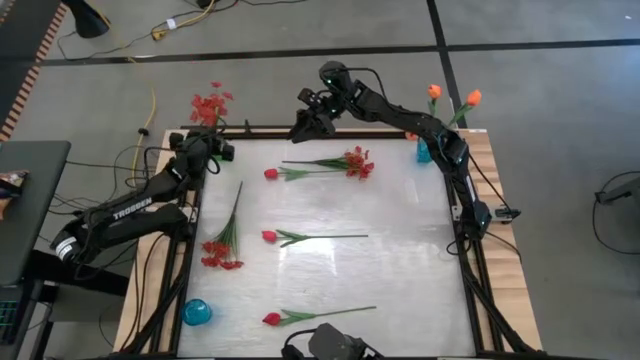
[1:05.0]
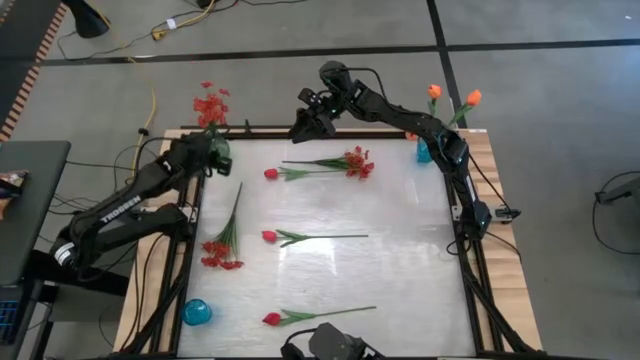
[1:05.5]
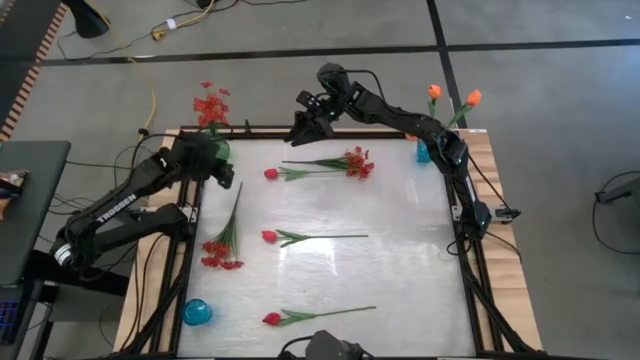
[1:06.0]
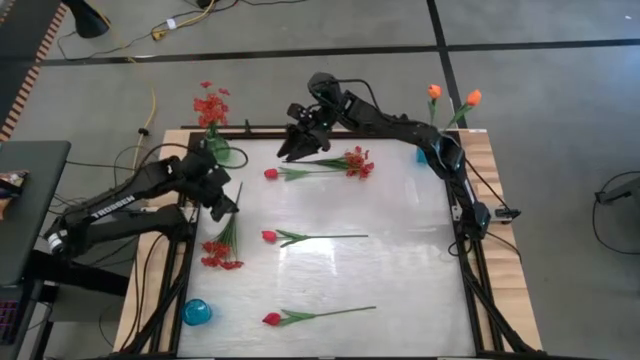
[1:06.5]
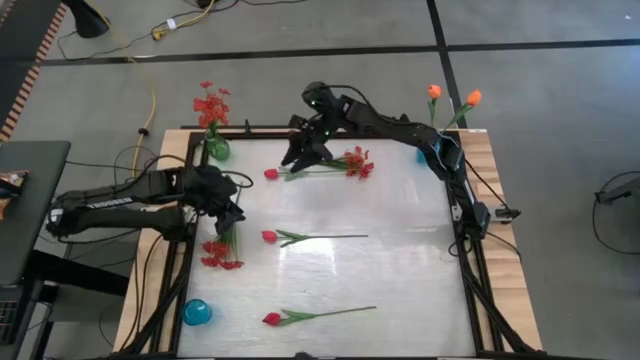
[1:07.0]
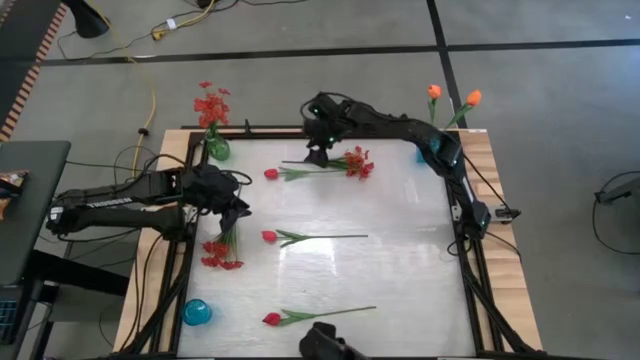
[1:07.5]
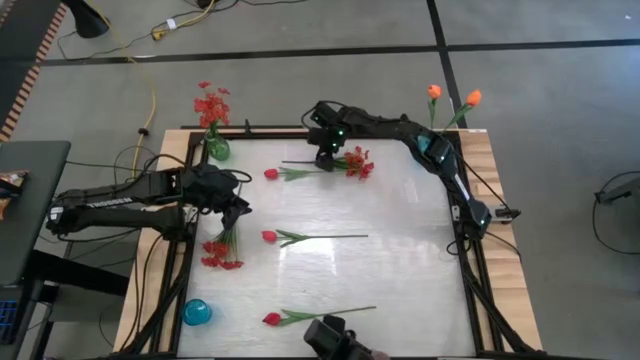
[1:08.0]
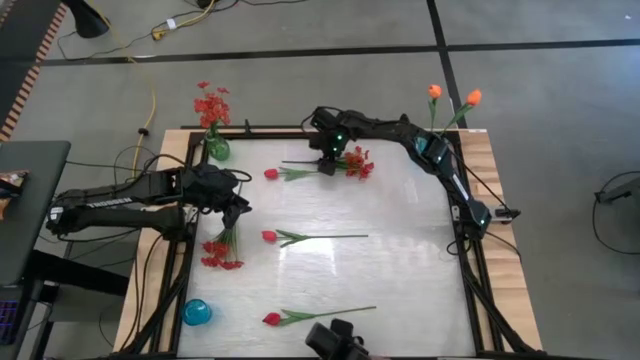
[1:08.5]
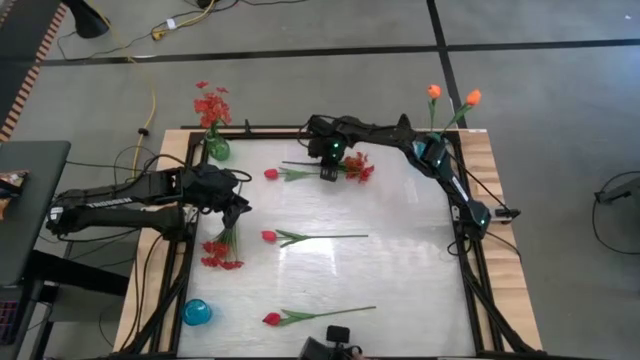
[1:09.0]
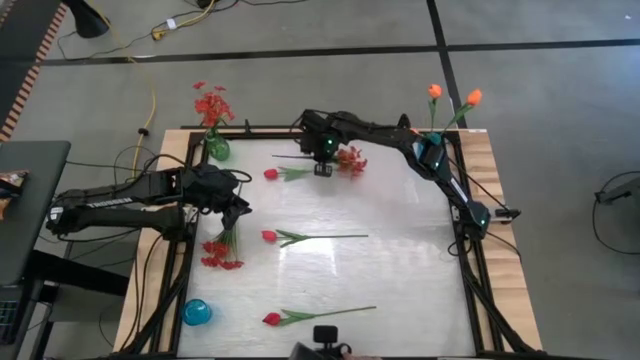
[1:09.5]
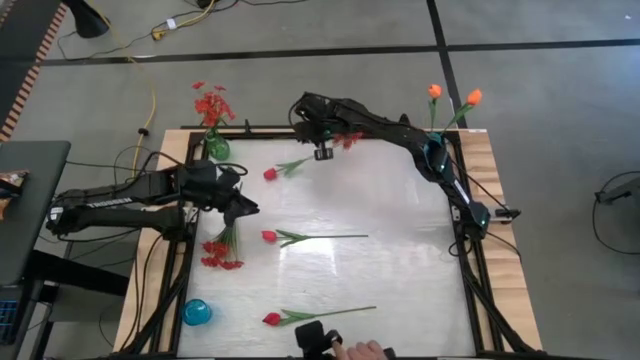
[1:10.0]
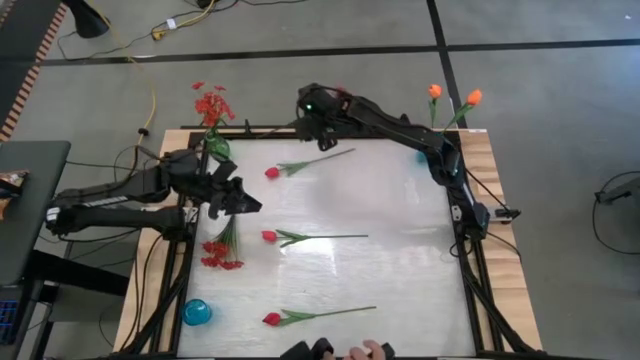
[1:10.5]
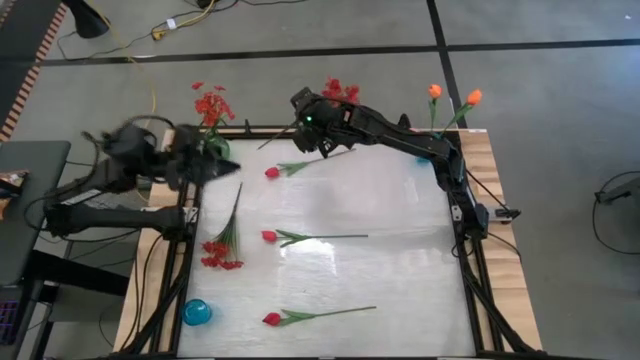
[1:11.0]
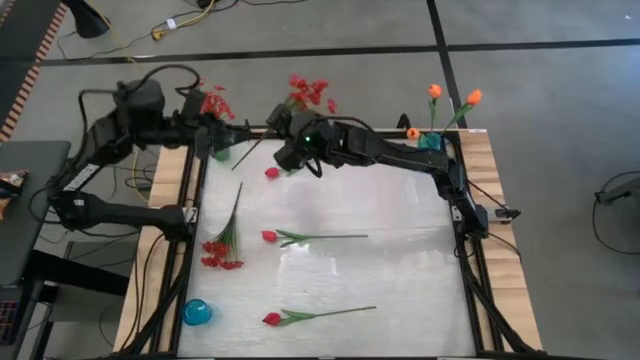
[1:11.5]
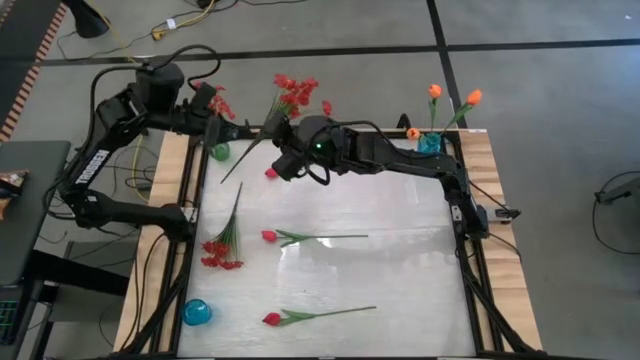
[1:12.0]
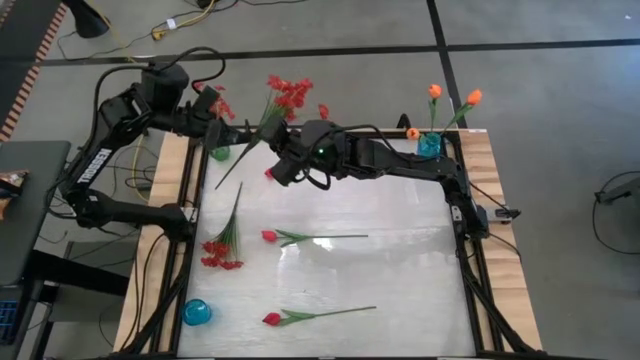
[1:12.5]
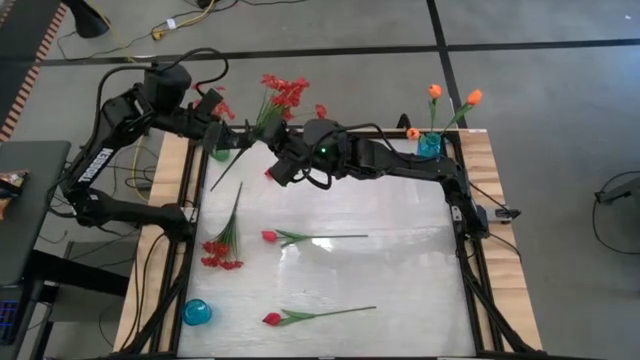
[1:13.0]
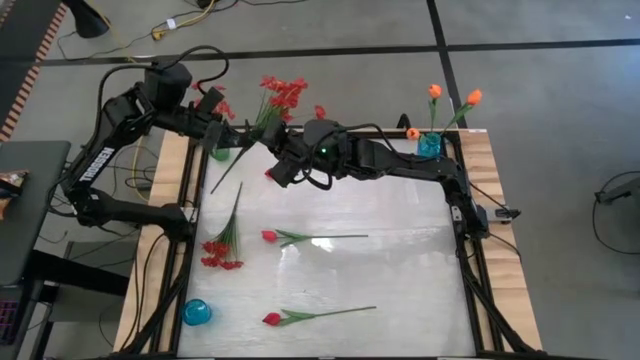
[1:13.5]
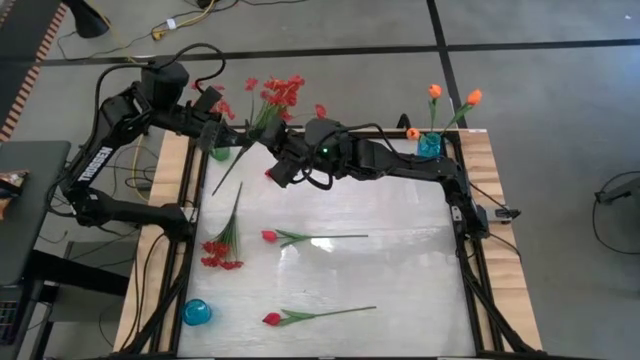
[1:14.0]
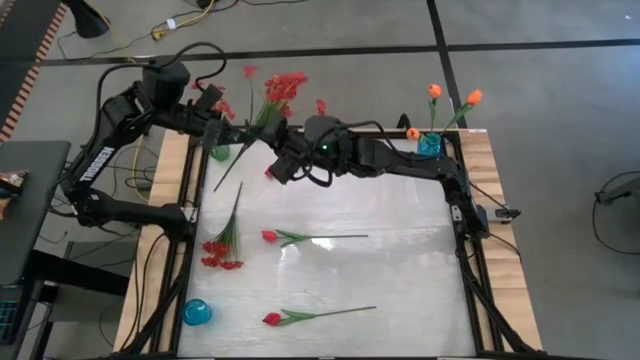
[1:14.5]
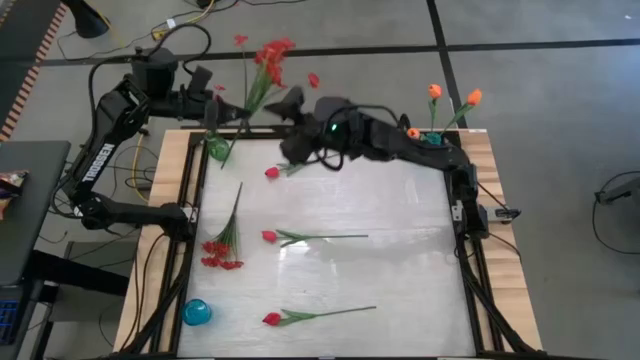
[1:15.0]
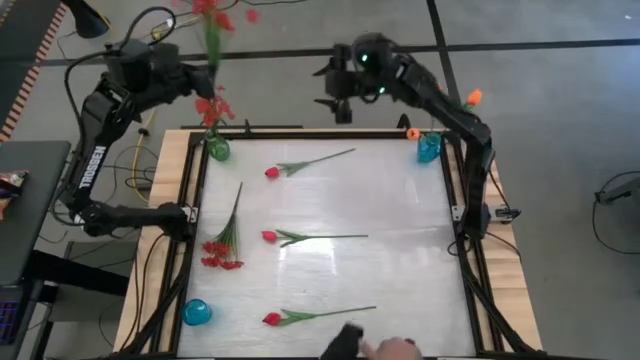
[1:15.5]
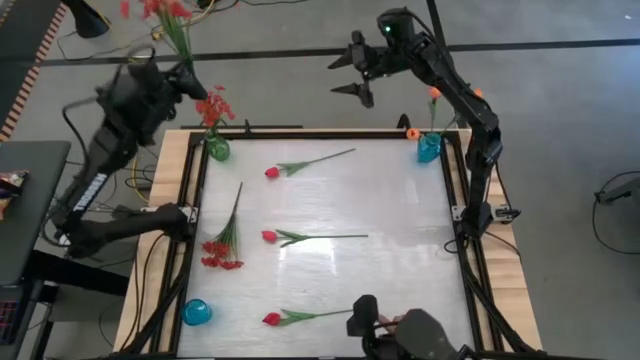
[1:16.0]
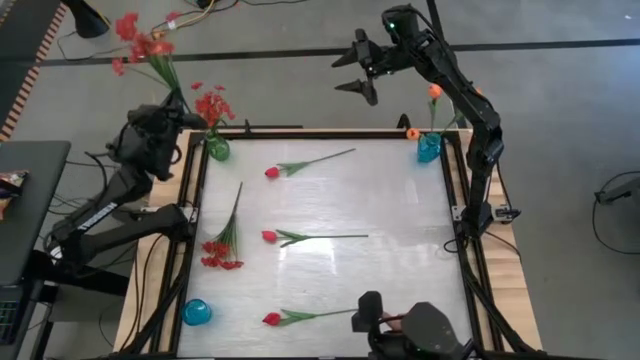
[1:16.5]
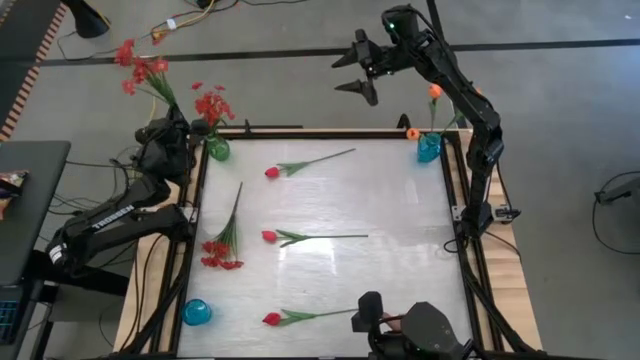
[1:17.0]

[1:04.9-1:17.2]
Task: Sort flowers into vase by color
Put the top red flowers into the green vase

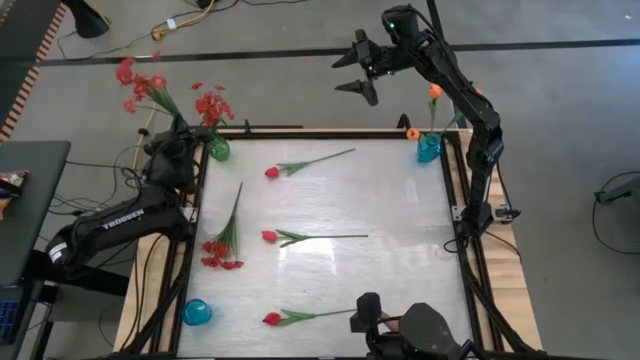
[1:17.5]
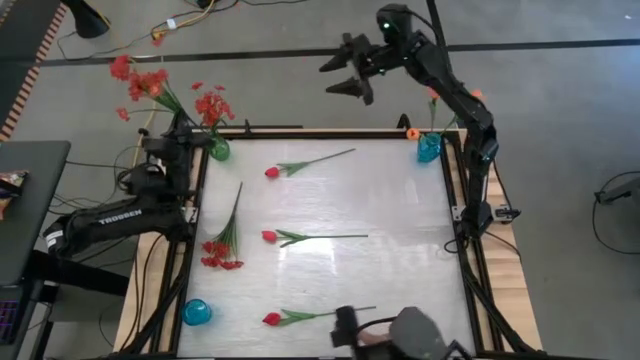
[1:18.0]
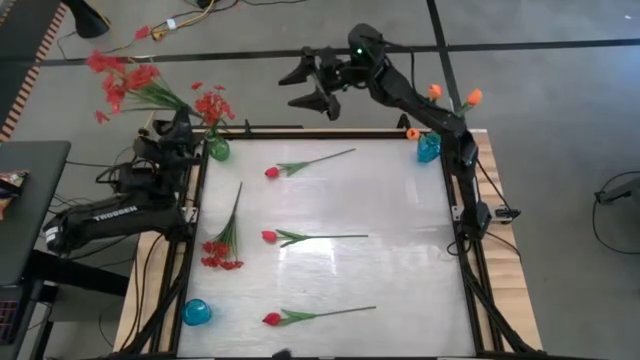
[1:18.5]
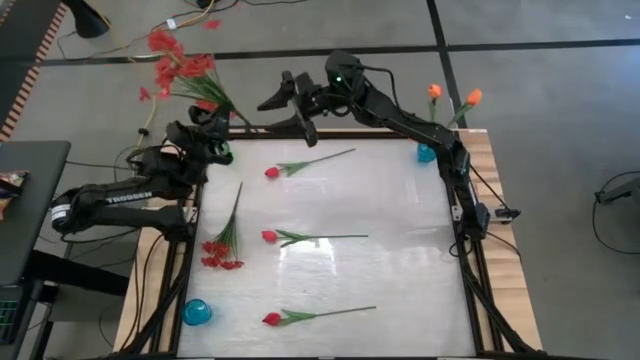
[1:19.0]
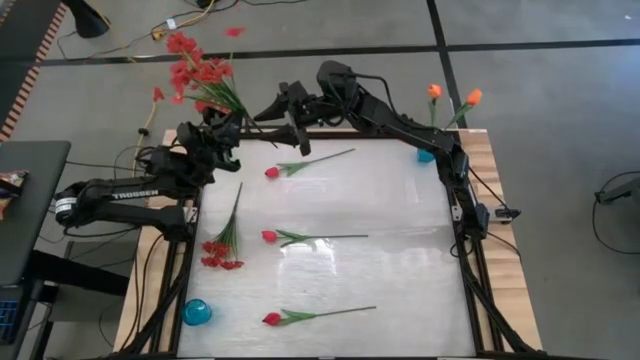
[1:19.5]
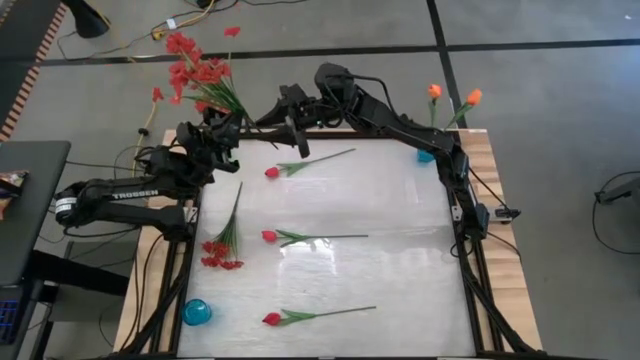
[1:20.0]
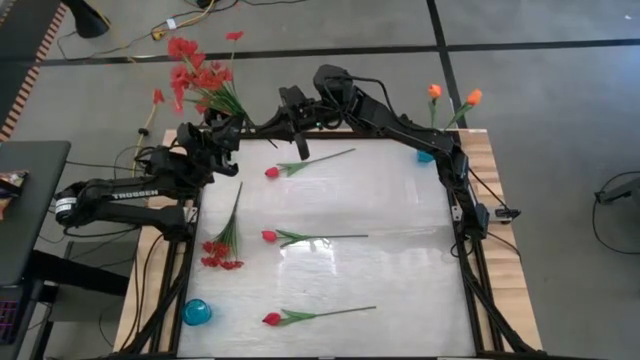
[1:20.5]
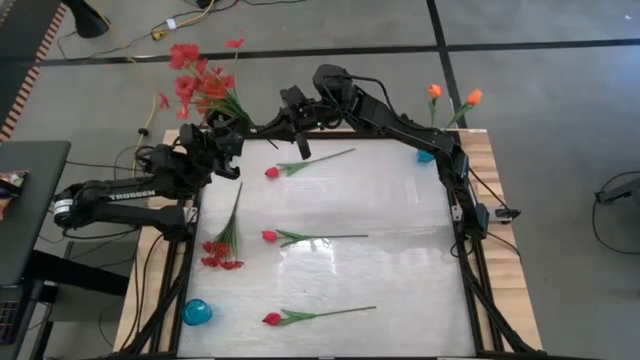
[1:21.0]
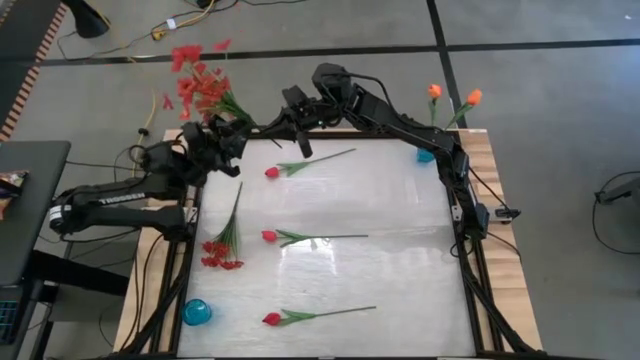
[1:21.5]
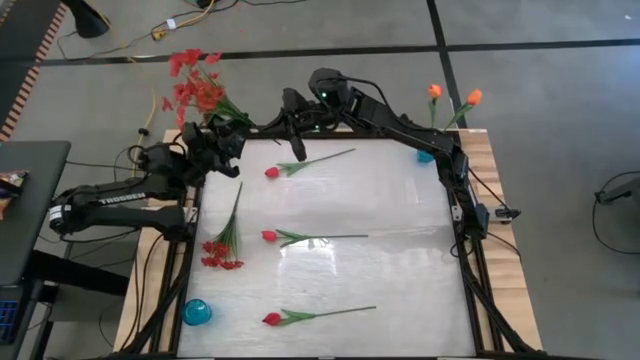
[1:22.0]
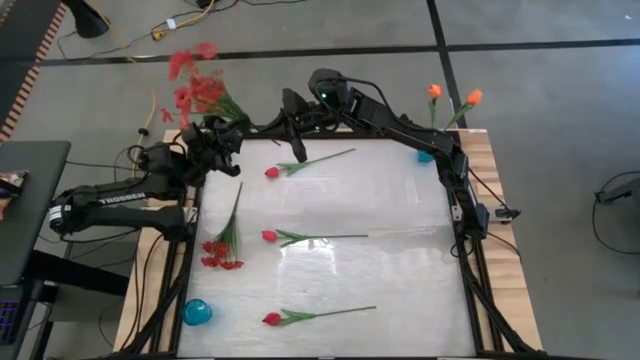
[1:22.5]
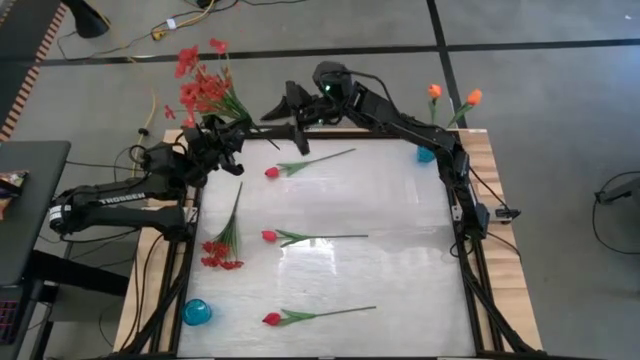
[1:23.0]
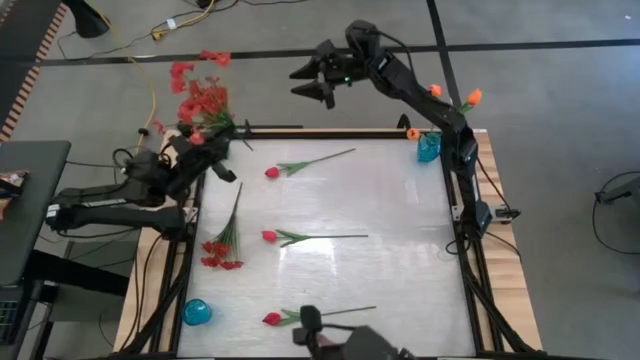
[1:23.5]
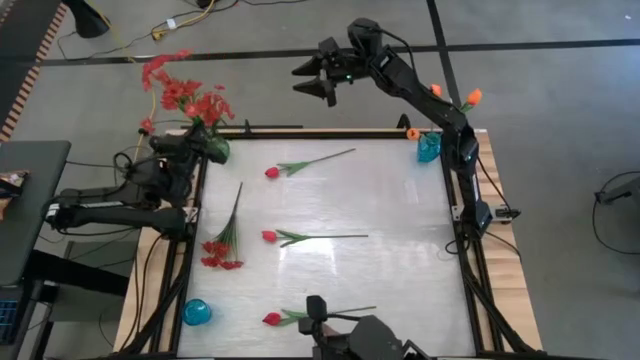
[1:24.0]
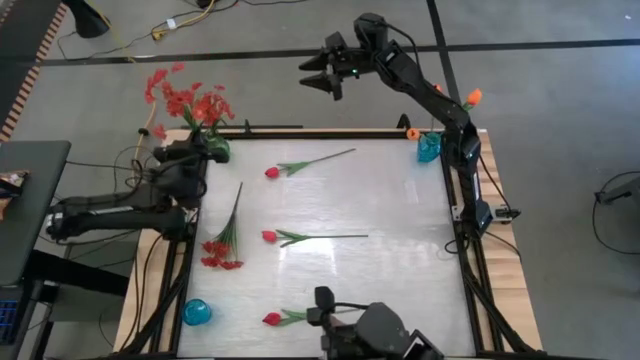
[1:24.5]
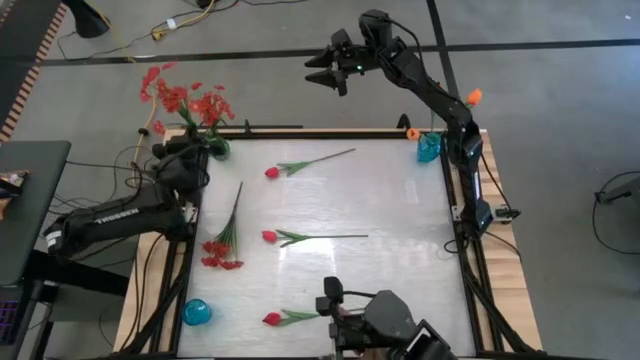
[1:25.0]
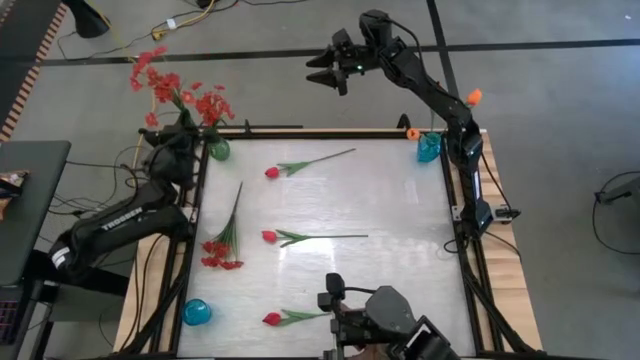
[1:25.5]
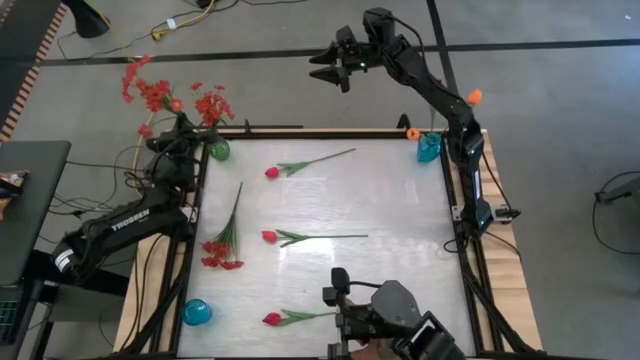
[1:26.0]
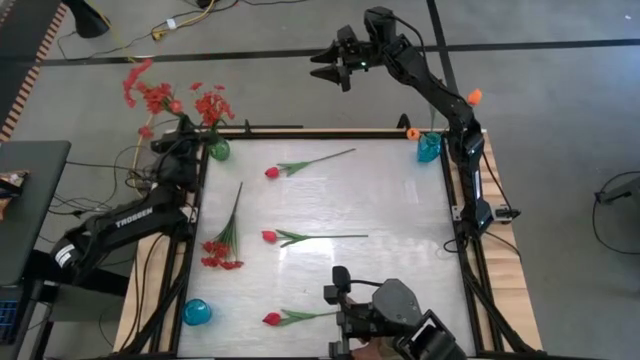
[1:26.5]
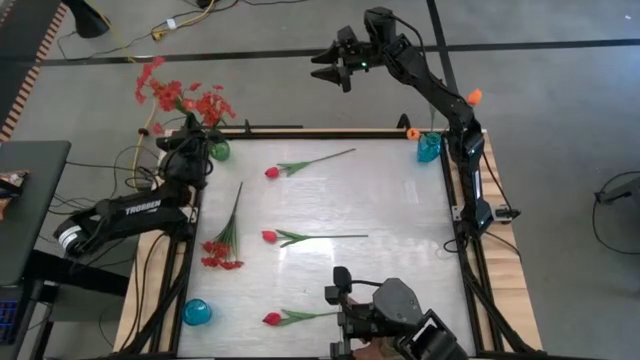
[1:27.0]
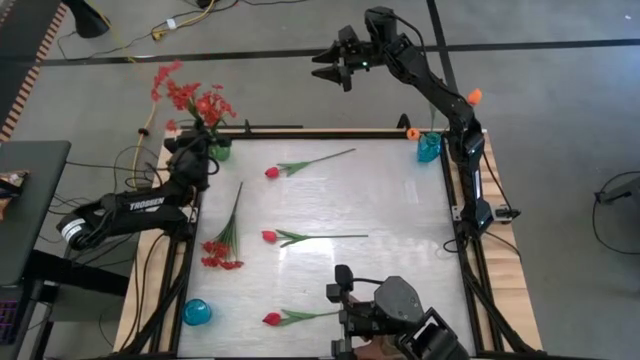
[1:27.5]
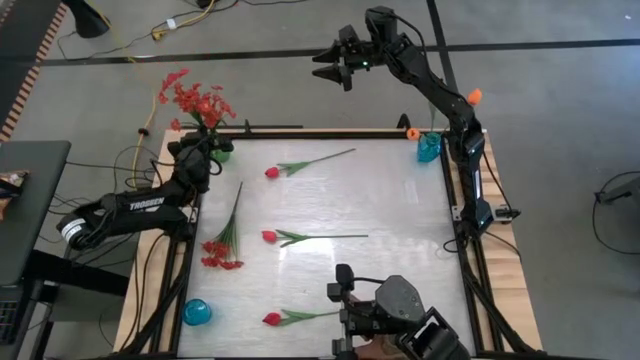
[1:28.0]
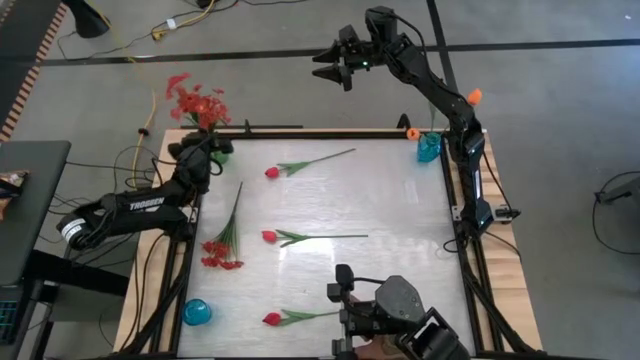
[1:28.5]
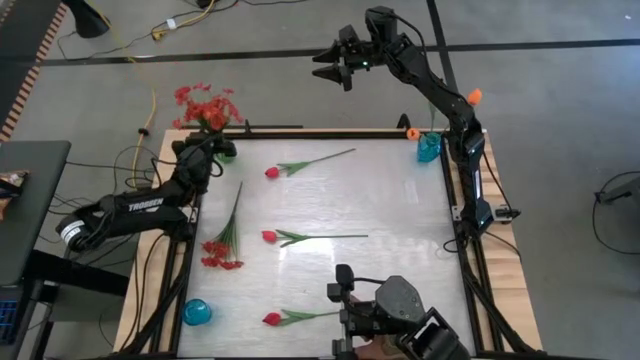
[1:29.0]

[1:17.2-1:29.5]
Put the top red flowers into the green vase
